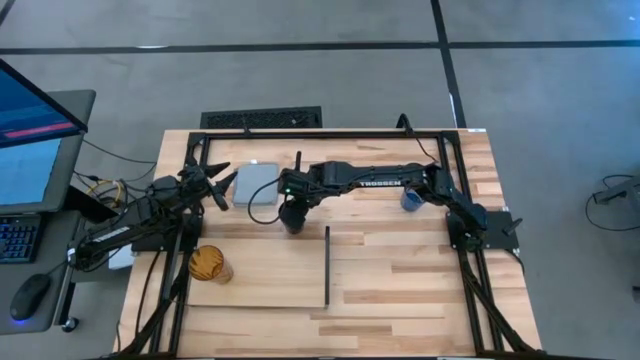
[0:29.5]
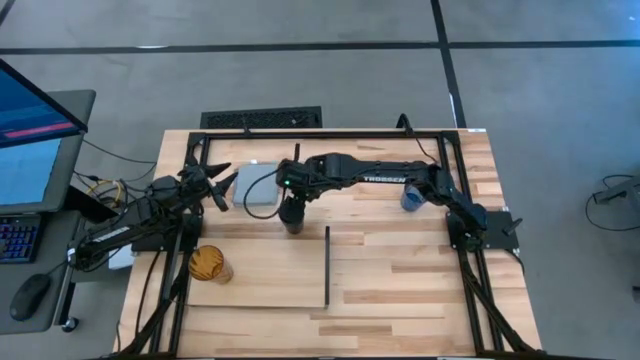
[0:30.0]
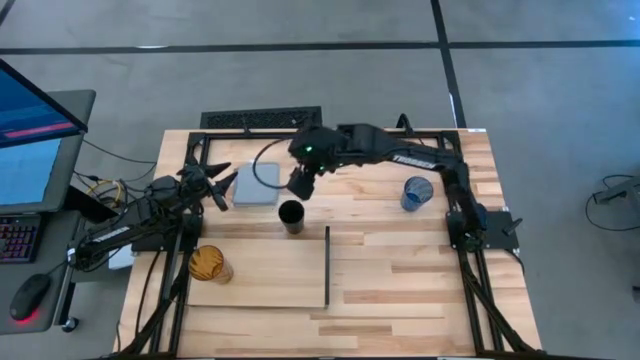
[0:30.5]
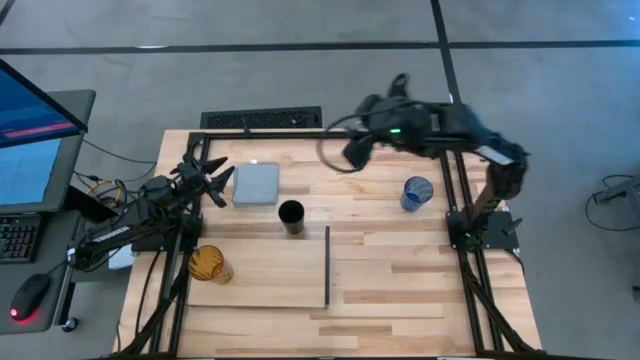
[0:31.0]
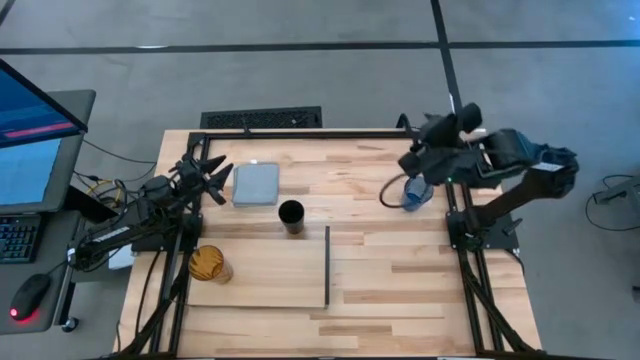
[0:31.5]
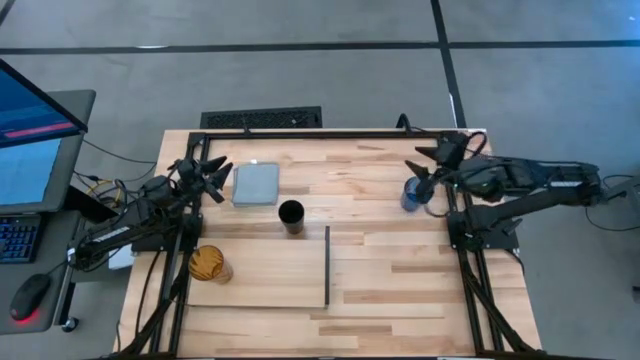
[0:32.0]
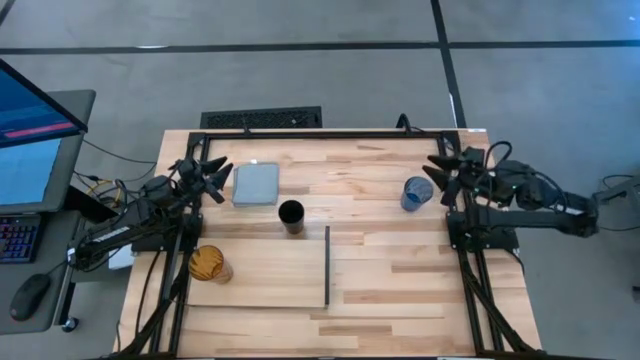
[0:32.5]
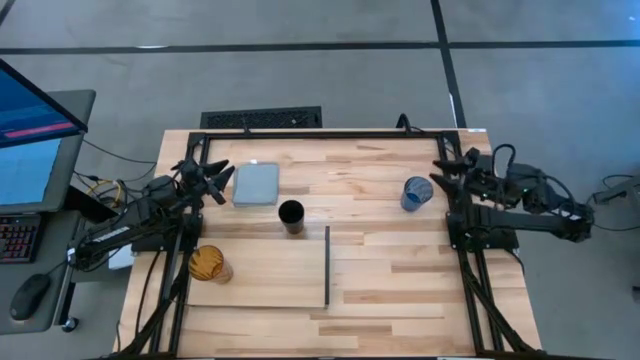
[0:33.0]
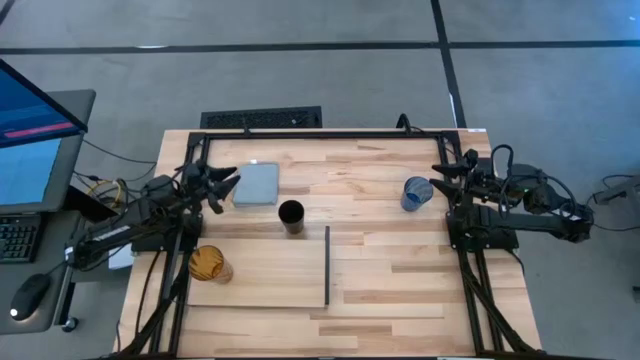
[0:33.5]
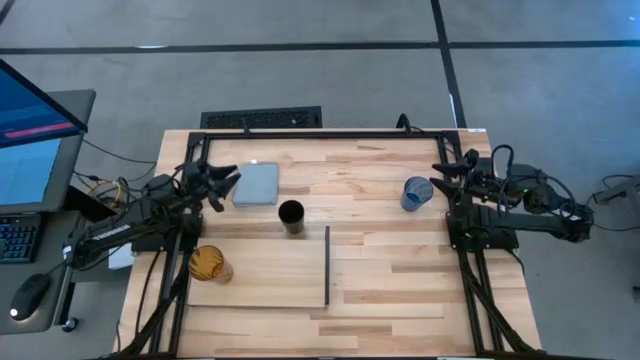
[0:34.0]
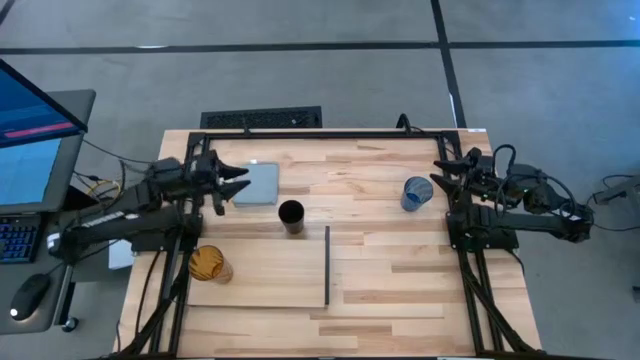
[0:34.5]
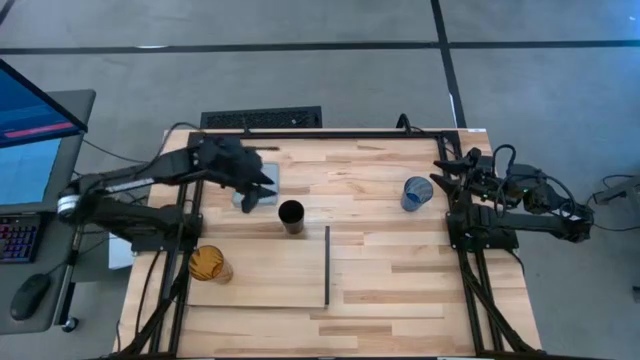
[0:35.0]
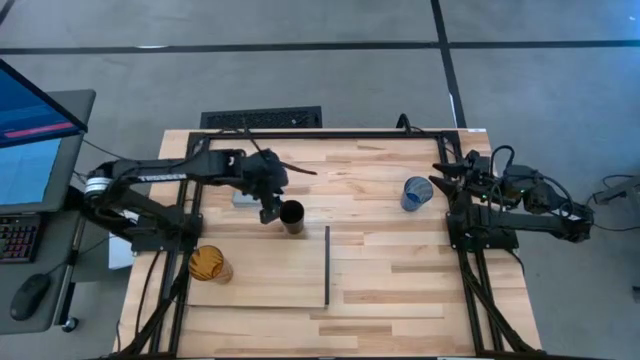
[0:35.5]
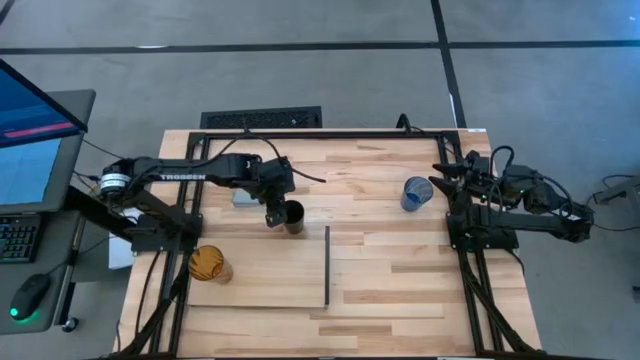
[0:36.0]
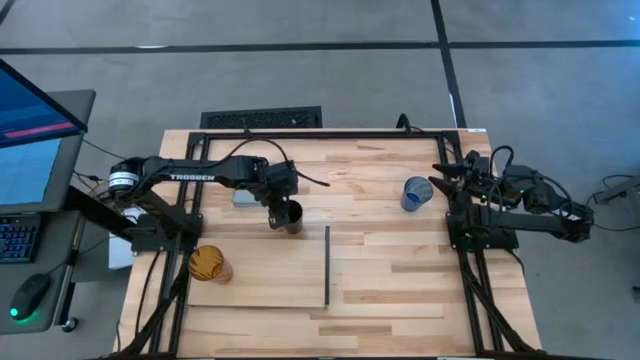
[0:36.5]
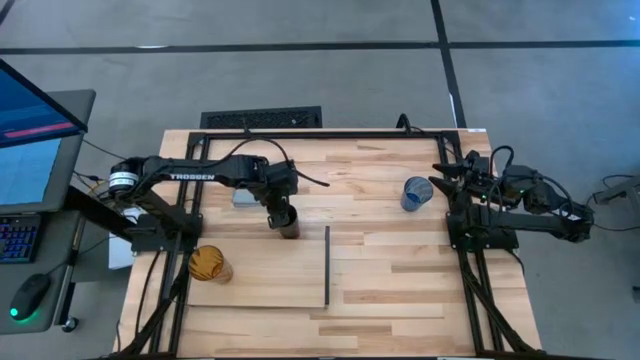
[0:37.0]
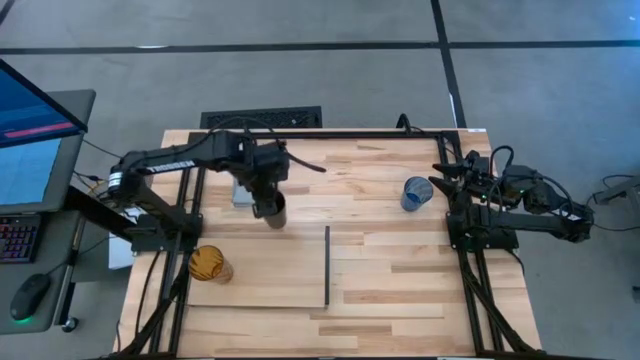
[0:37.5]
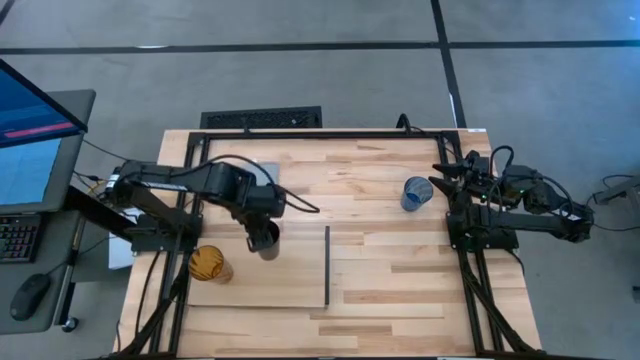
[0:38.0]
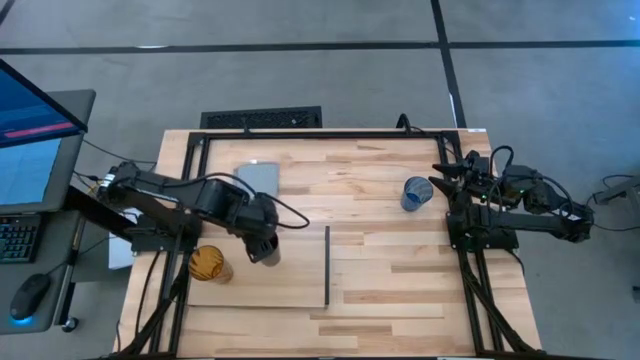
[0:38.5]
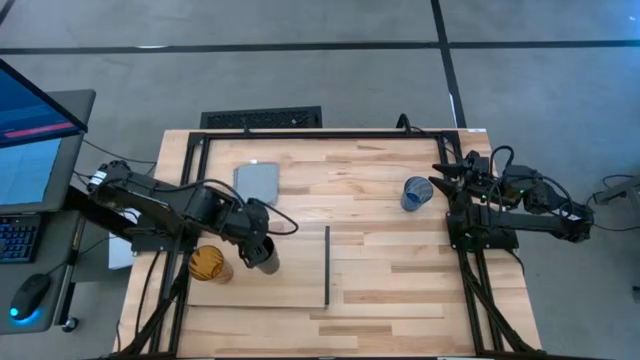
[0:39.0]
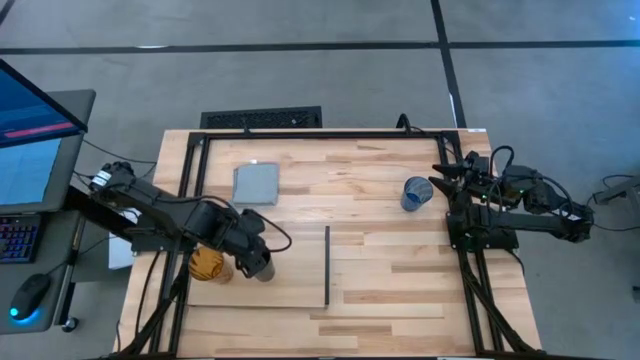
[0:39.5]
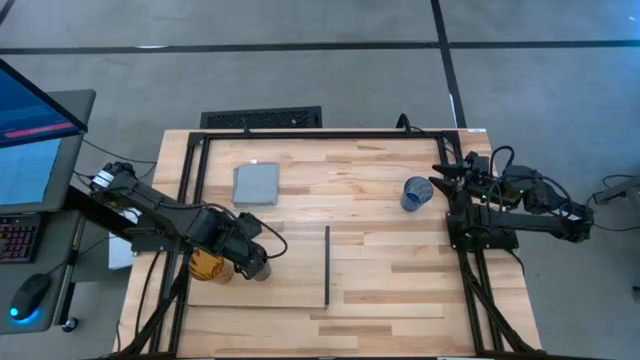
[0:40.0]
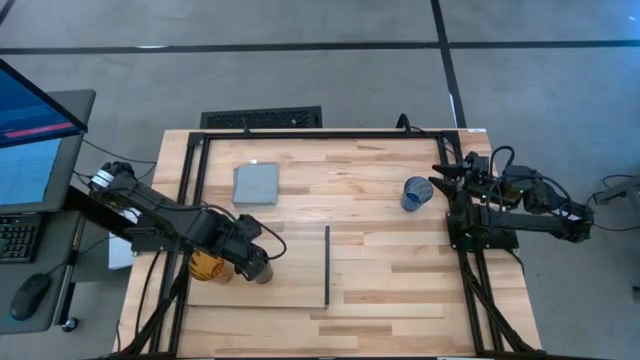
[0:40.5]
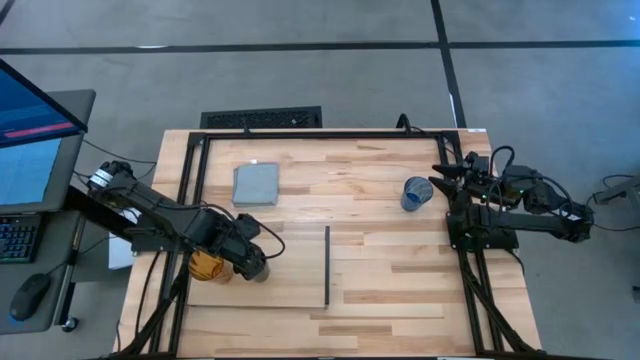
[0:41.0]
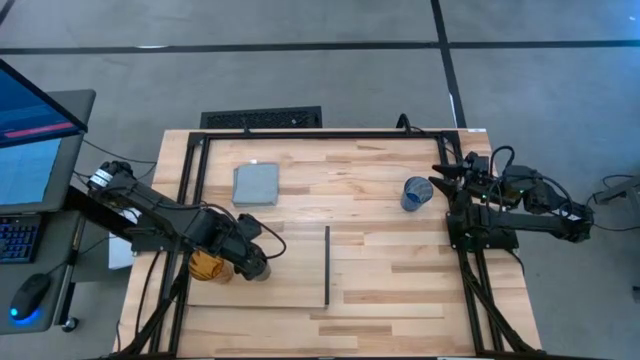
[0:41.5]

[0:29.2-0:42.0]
Task: Stack small to large cups/mugs on shelf
Put the black cup on the shelf

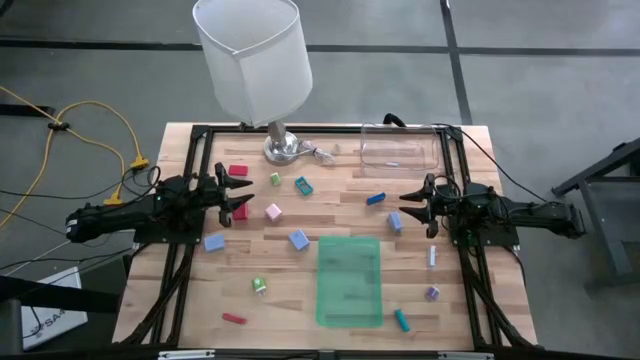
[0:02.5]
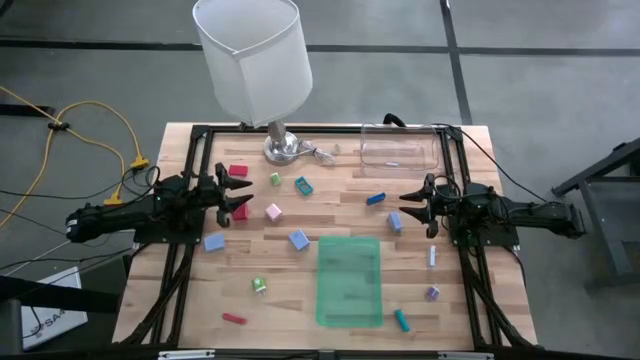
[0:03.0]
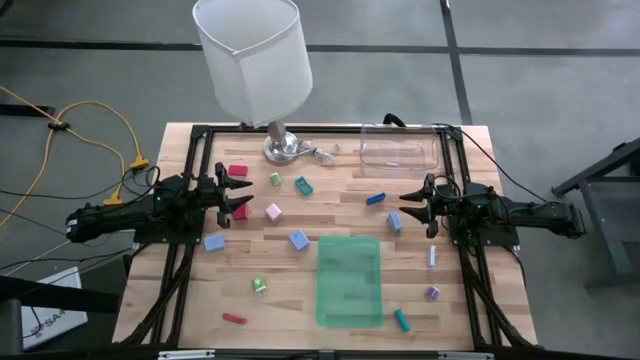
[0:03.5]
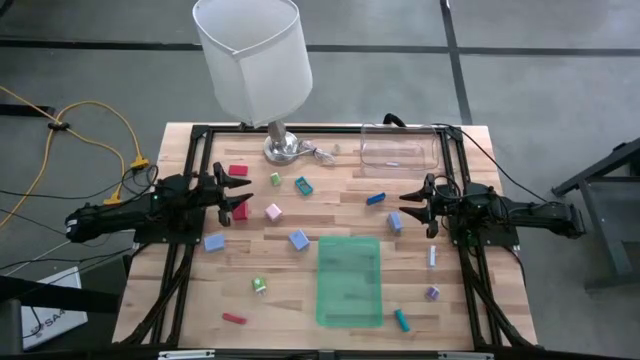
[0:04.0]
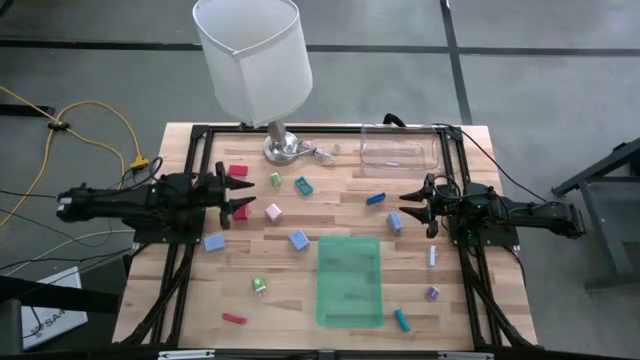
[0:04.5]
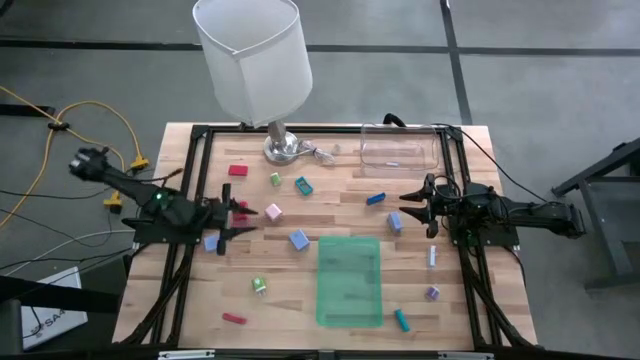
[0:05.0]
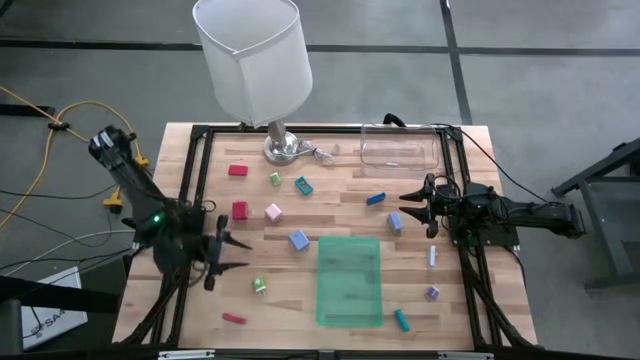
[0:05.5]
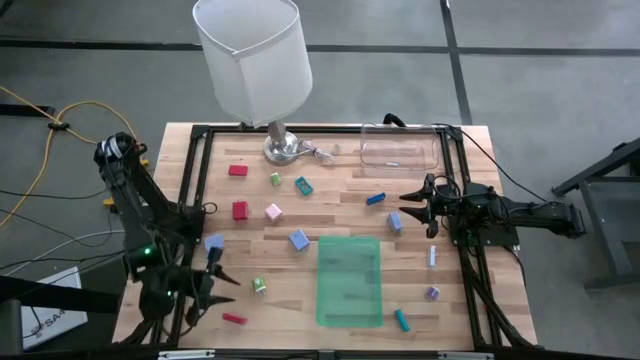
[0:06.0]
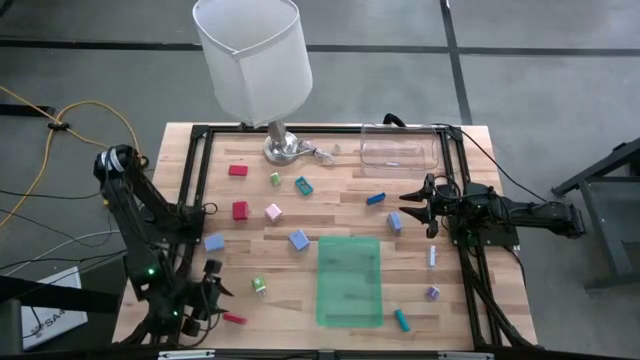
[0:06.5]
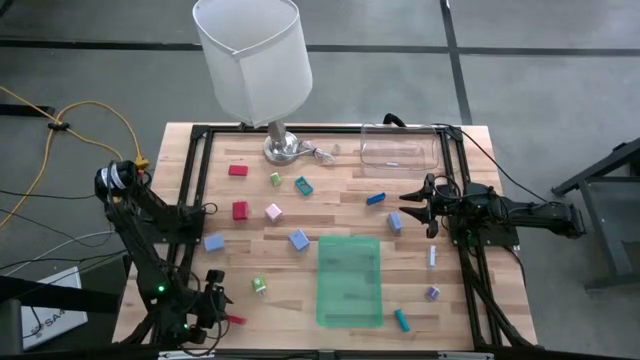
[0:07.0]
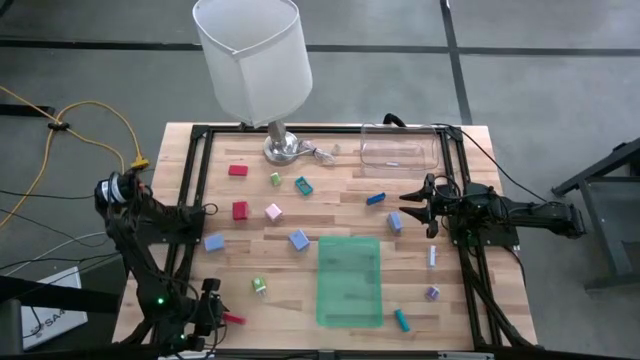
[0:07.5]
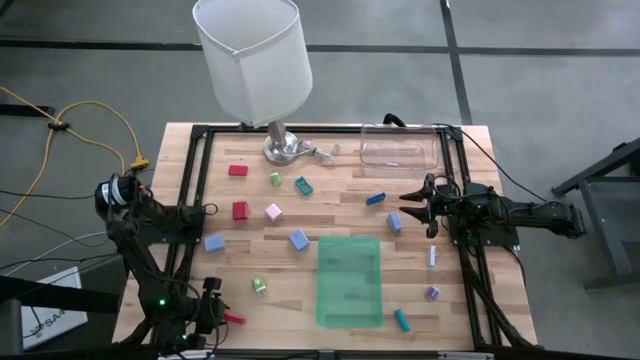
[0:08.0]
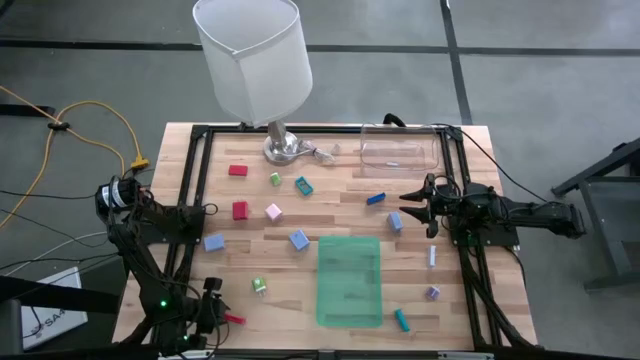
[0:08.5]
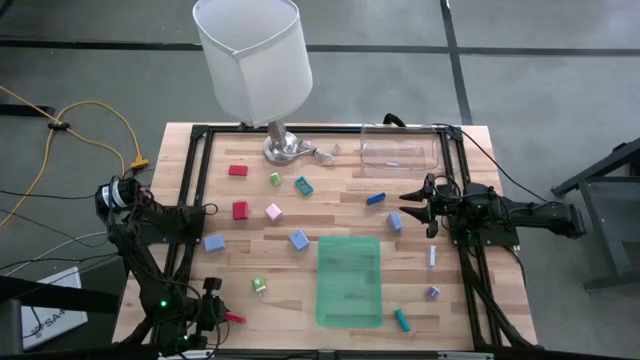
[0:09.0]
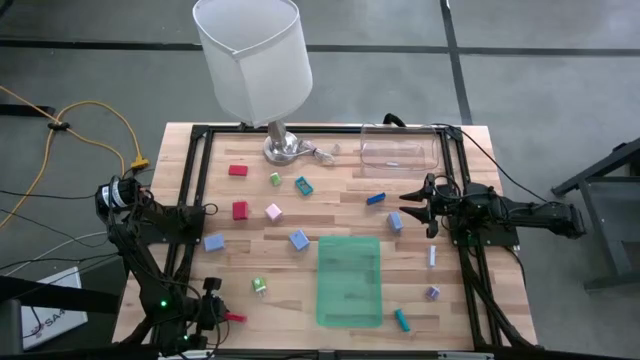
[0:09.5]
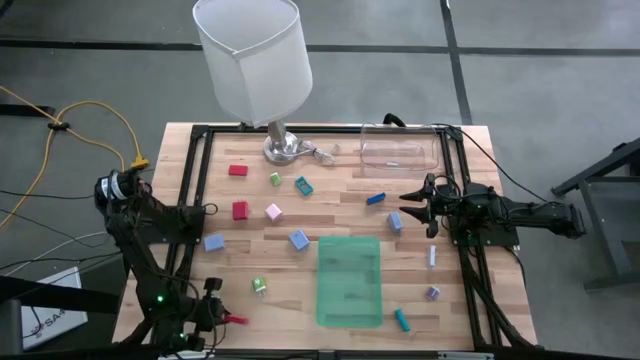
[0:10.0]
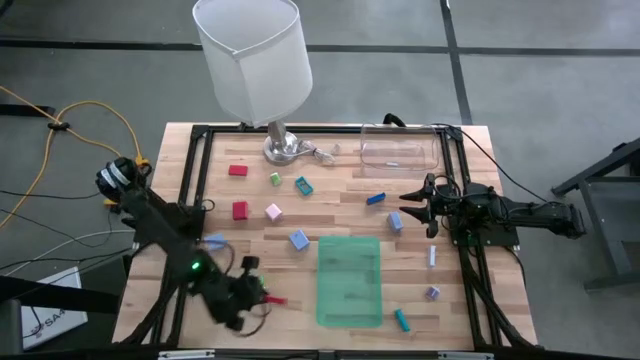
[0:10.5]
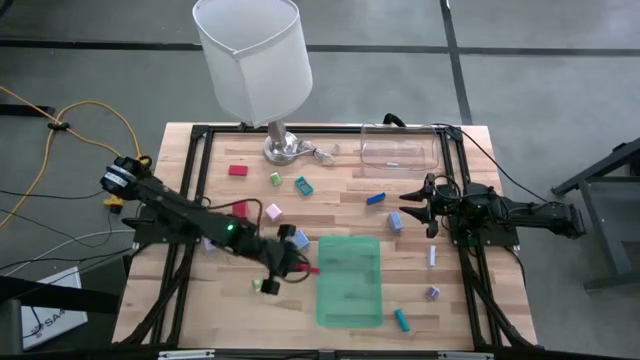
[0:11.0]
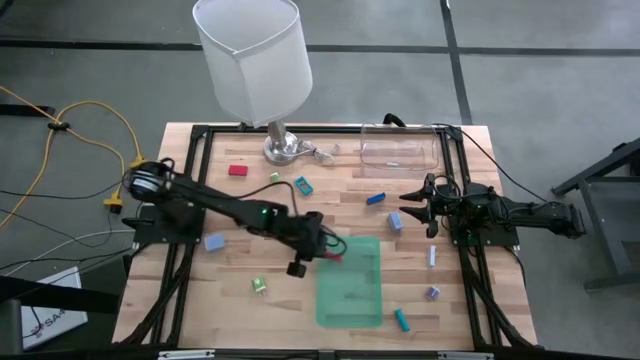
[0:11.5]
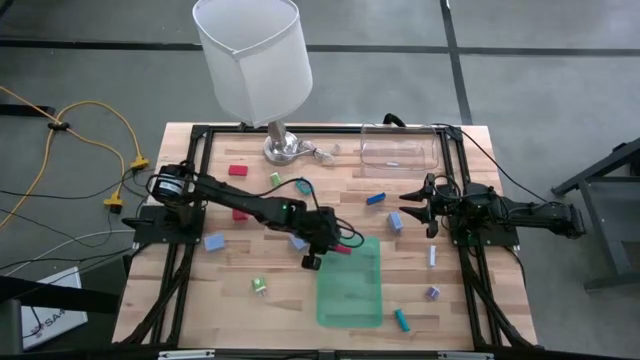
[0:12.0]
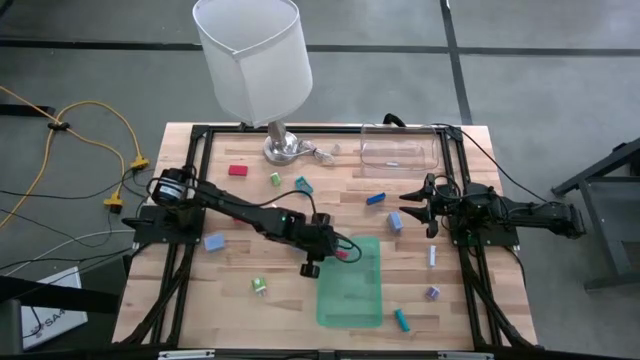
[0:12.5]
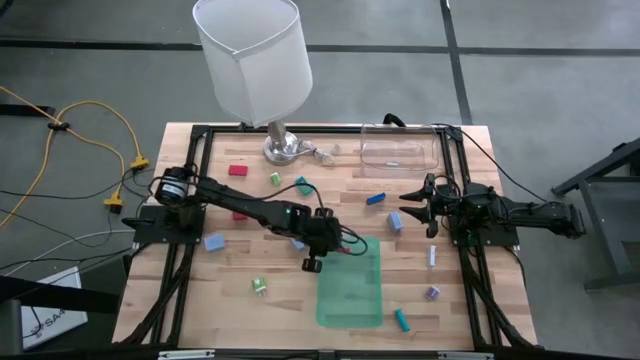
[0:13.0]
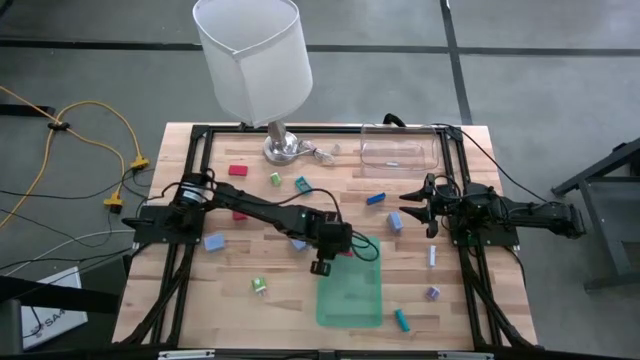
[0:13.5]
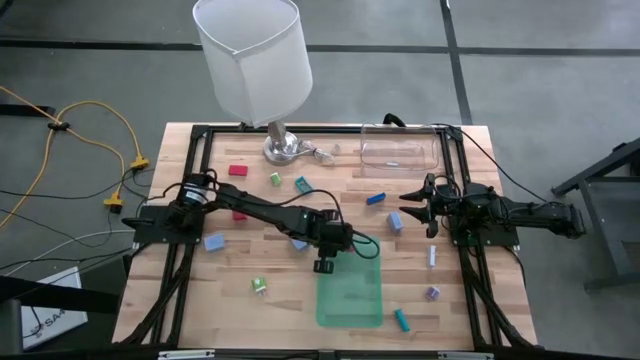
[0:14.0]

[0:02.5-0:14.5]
Task: Pick & Place Office items
Put the bottom red digital clock into the green bin
